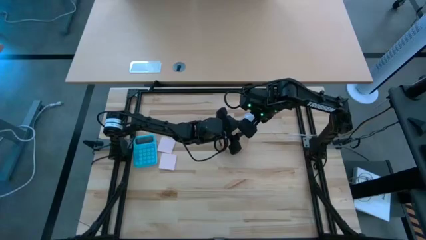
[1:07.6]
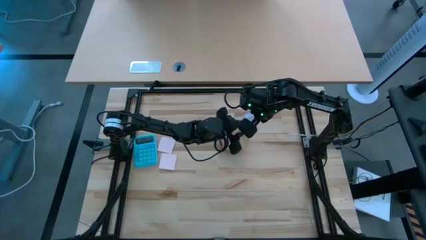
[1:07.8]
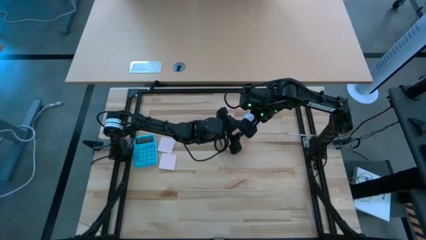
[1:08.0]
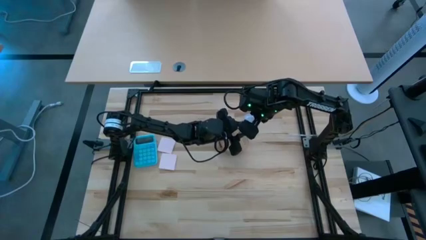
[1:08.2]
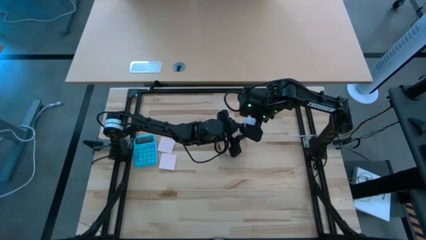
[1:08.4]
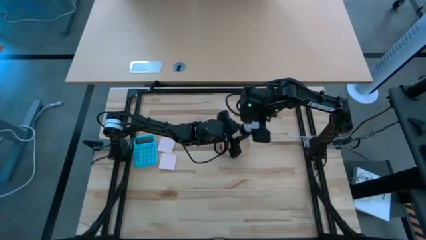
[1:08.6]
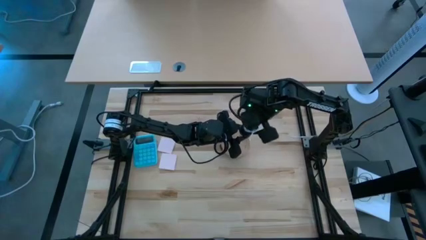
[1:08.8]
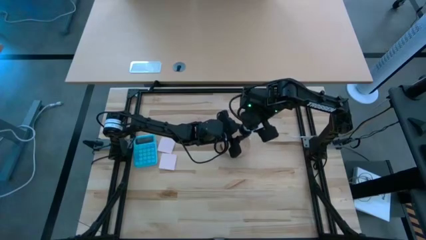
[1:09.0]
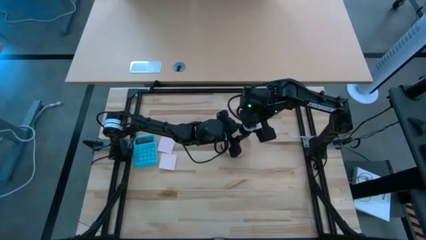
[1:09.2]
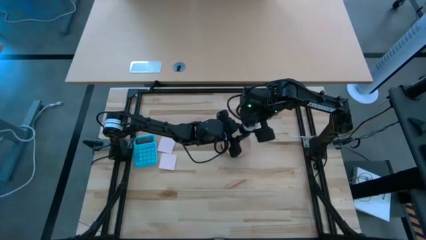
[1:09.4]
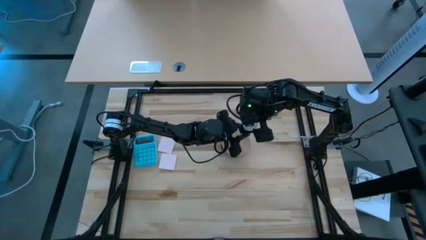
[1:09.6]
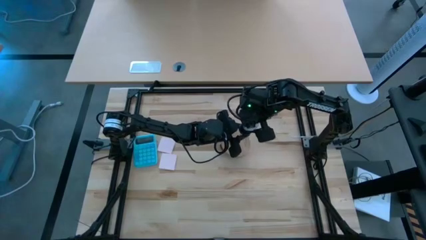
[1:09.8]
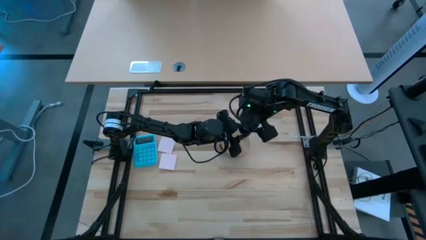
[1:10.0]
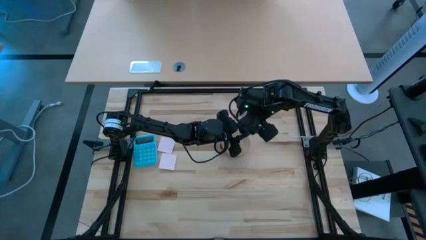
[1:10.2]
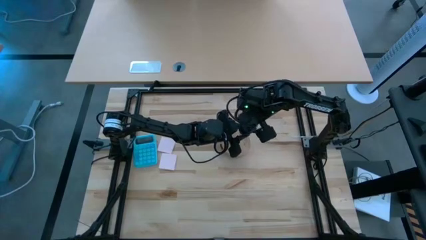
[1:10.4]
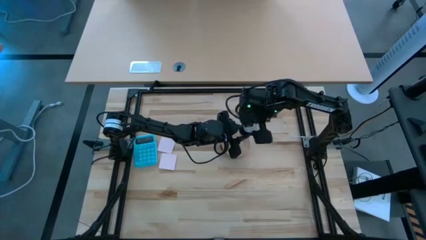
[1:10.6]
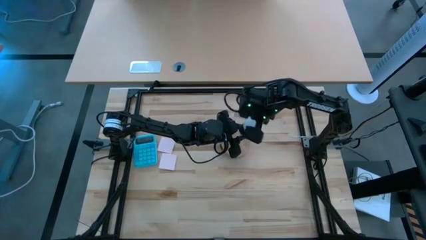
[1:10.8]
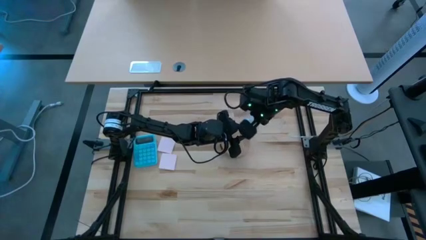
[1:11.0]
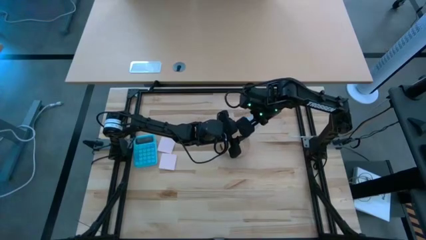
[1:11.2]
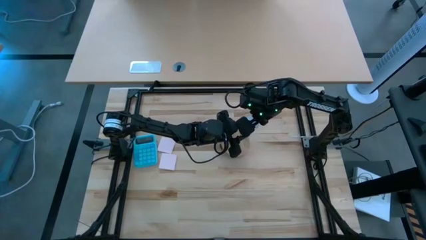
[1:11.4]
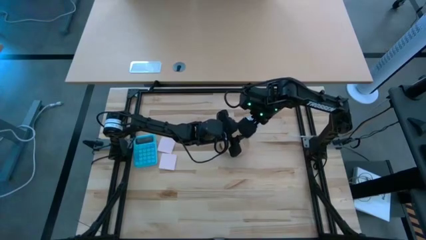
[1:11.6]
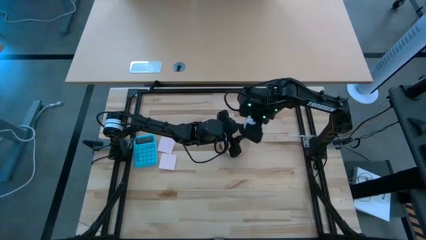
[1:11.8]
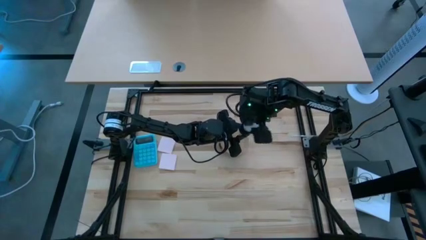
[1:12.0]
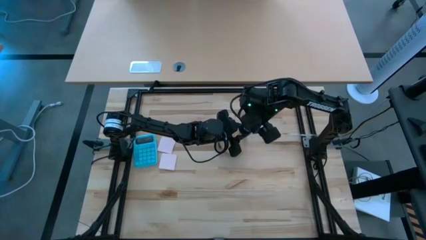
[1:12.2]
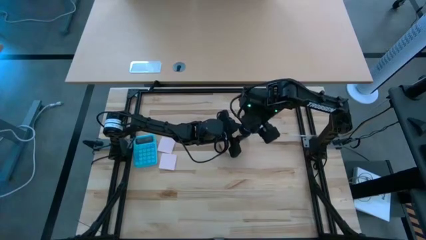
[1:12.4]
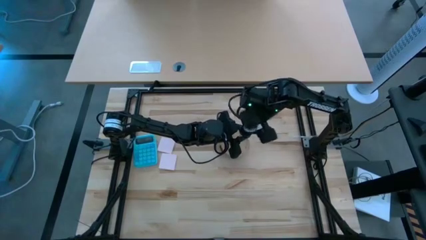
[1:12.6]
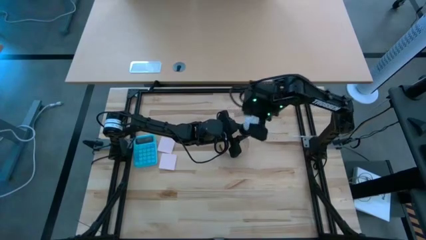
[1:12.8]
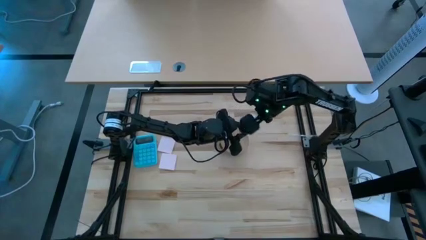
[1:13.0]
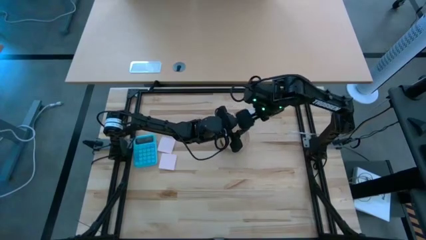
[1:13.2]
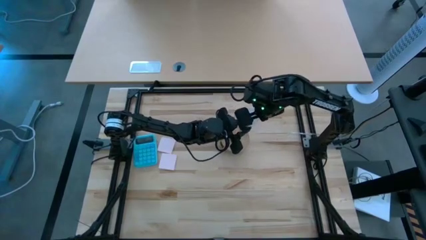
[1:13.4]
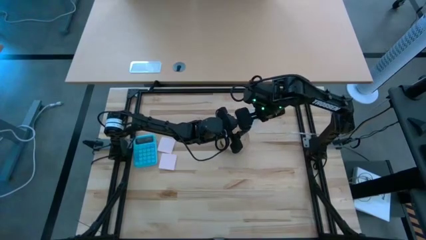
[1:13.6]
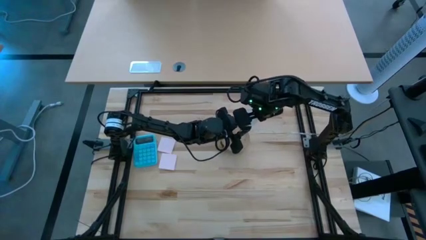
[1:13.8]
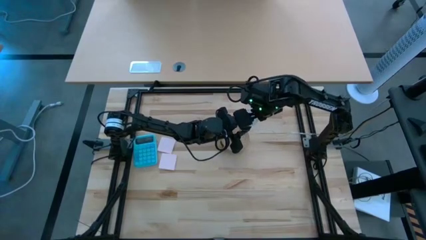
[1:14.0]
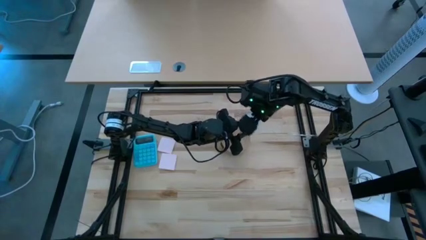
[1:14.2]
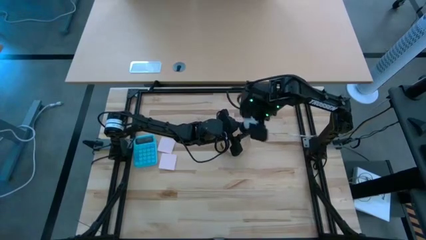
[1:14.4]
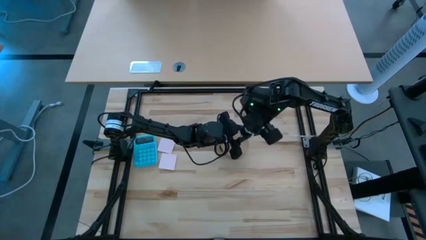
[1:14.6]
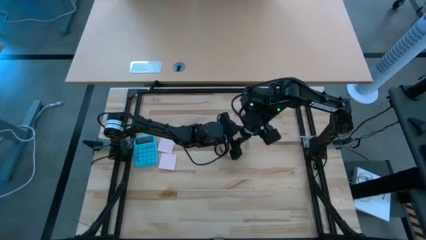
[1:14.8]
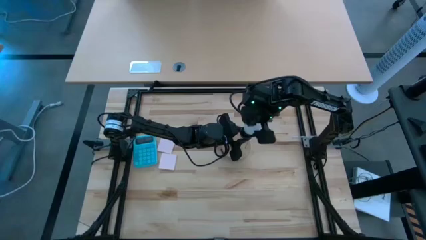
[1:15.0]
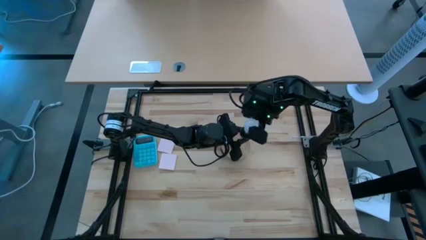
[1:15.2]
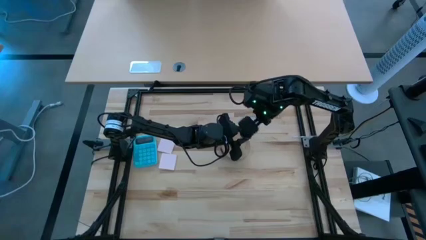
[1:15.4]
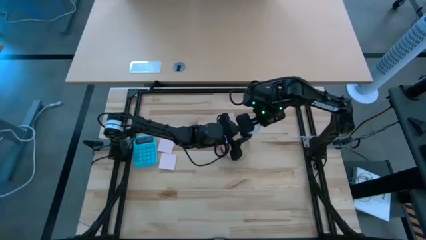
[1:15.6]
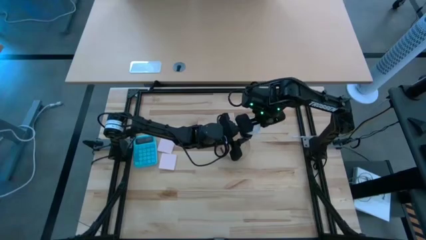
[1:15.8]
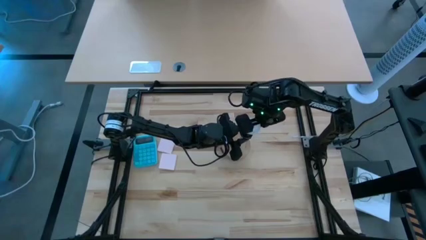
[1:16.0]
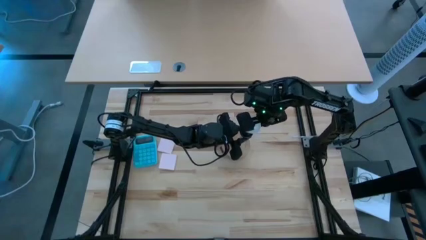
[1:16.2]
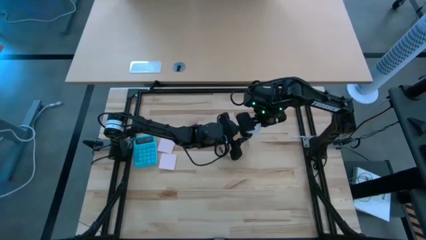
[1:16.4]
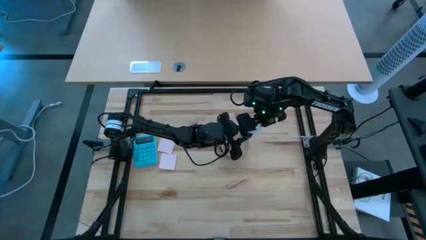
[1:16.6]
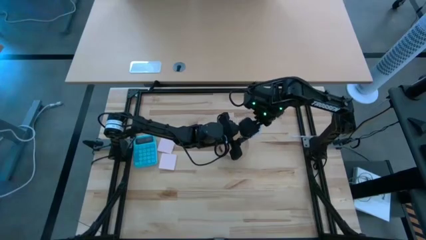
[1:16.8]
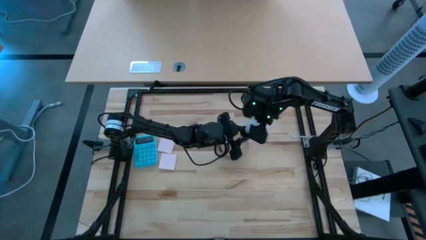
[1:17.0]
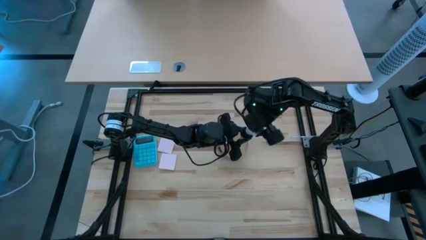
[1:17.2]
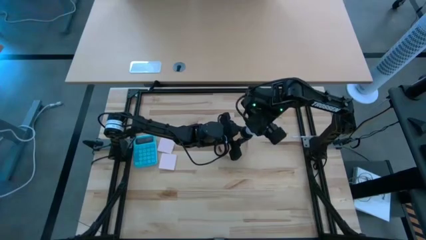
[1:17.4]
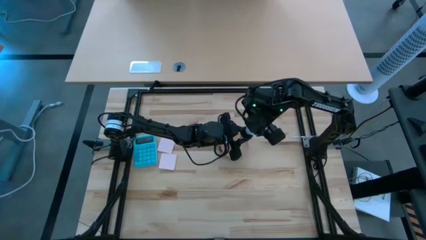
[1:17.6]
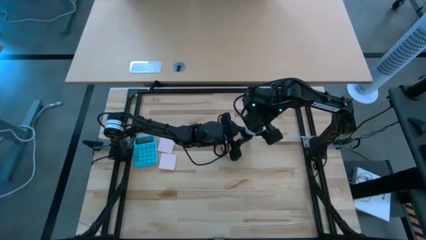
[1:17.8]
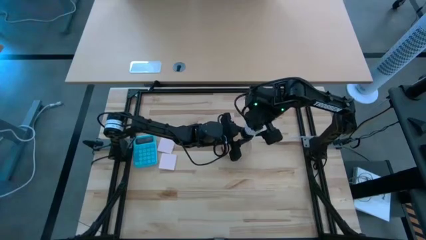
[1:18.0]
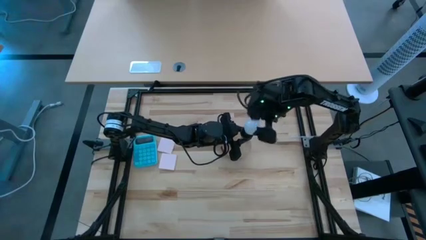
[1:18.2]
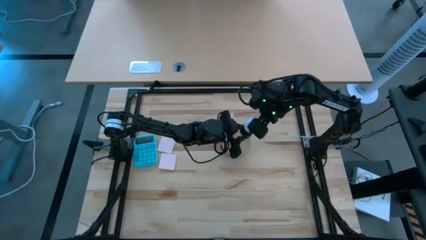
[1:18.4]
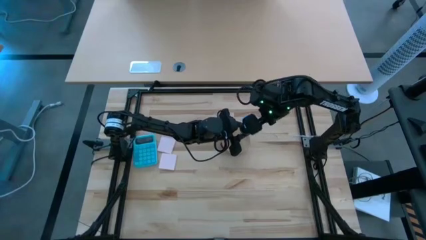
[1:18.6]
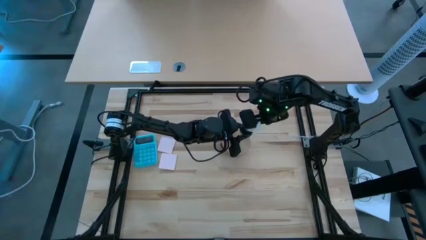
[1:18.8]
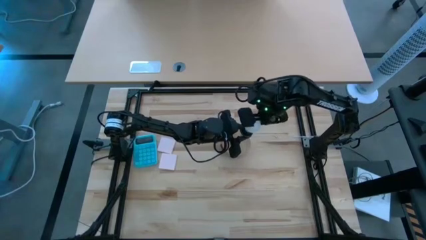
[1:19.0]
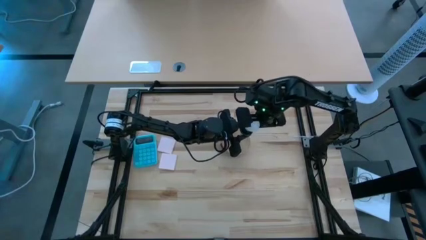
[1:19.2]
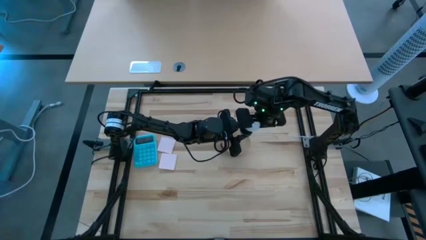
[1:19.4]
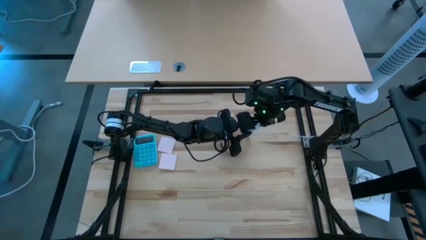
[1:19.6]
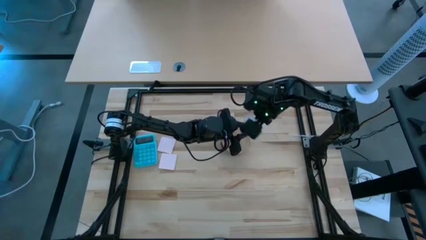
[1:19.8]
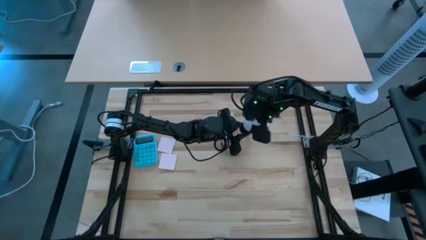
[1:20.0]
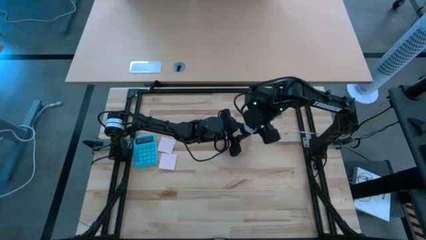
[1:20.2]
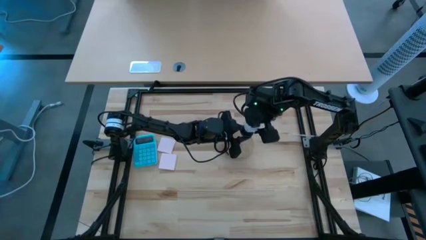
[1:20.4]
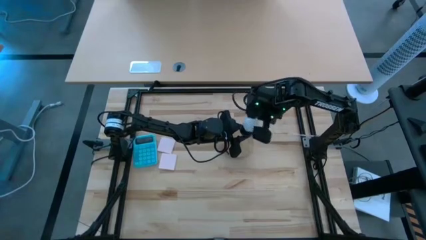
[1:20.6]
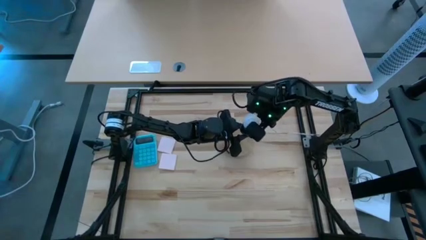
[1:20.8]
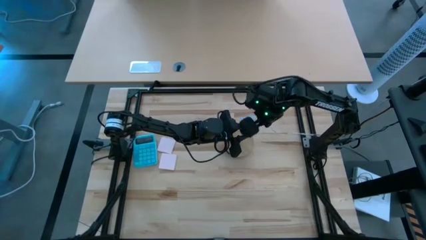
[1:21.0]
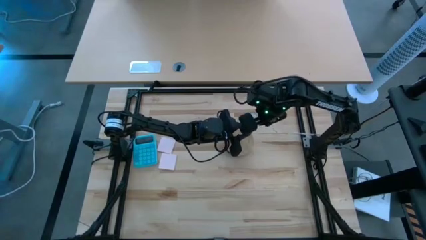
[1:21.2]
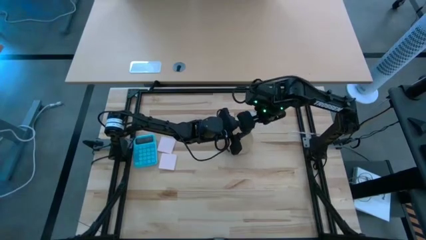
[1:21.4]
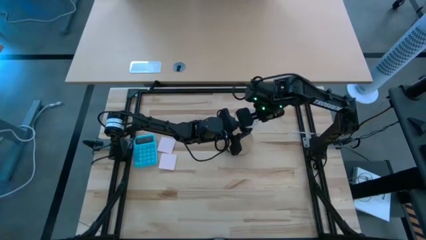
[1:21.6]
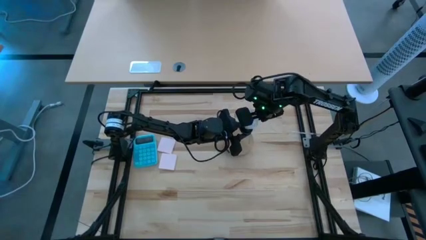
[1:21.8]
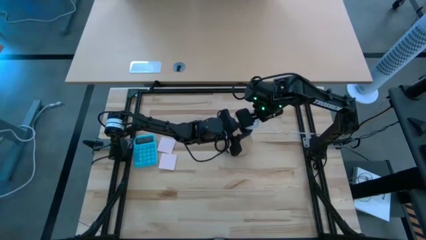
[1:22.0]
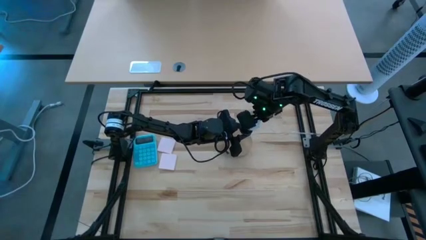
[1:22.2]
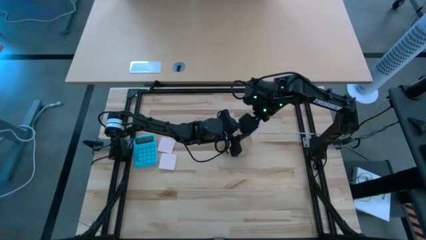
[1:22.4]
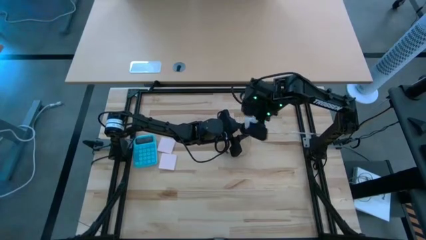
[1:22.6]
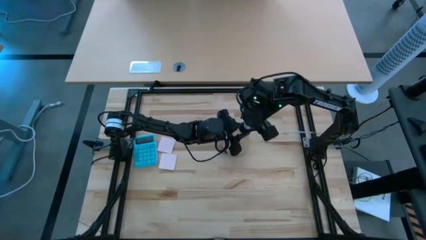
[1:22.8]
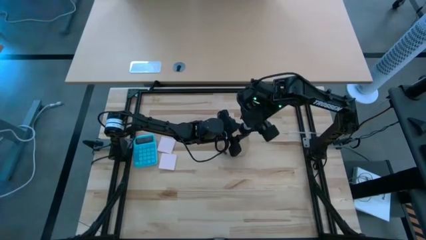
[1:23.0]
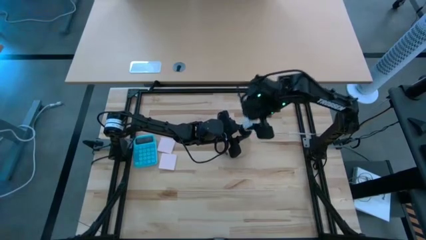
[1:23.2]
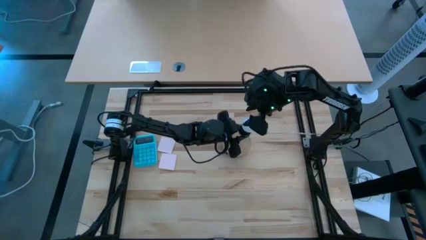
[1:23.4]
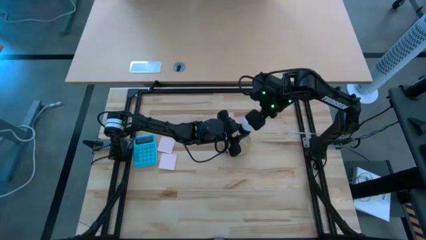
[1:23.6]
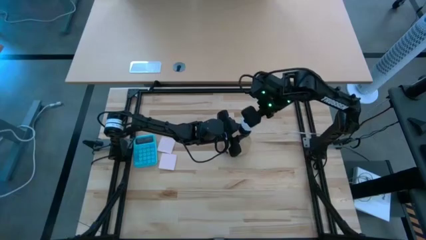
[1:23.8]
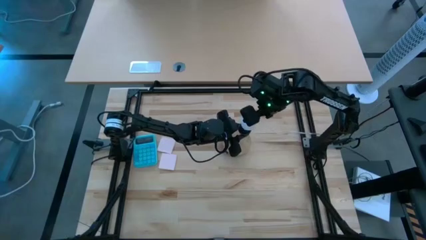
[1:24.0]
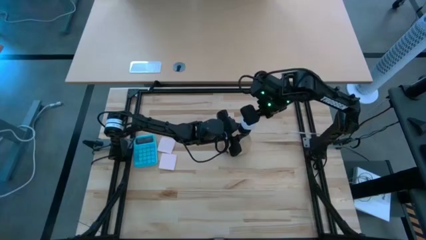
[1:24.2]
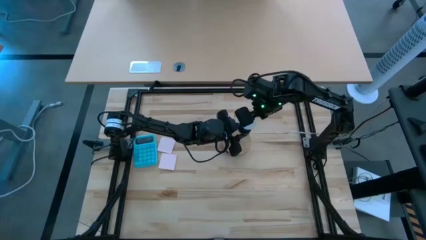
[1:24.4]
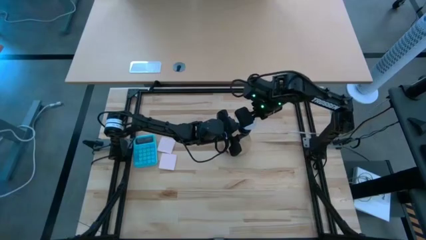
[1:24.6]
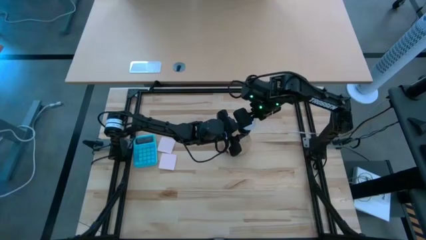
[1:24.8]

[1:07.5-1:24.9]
Task: Screw lightbulb
Remove the lightbulb from the lamp
